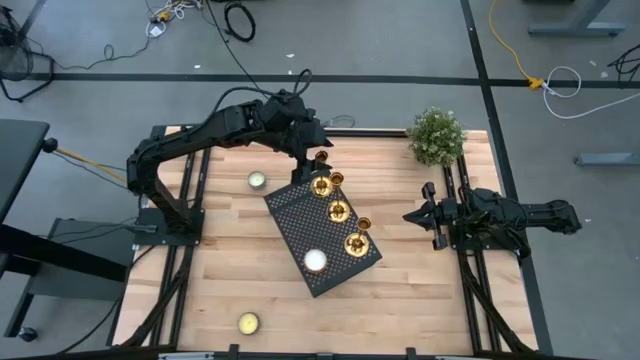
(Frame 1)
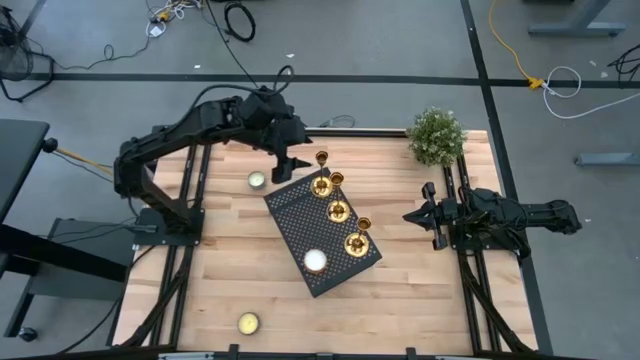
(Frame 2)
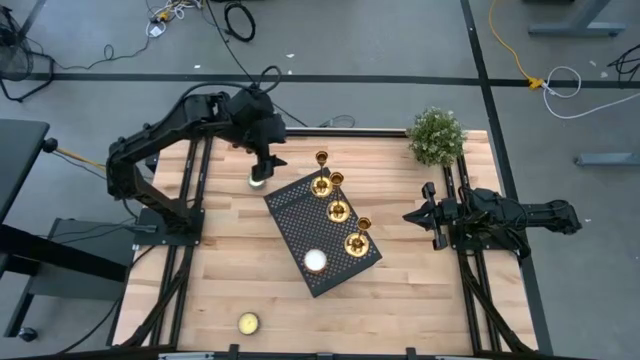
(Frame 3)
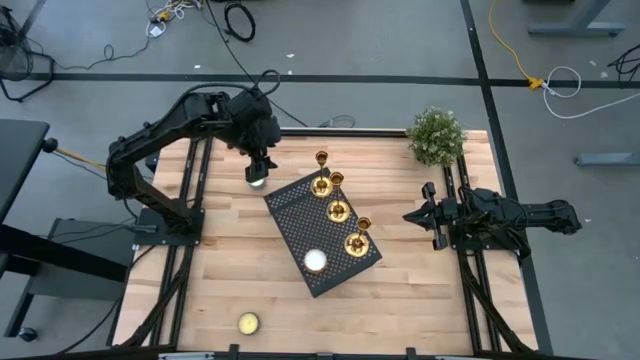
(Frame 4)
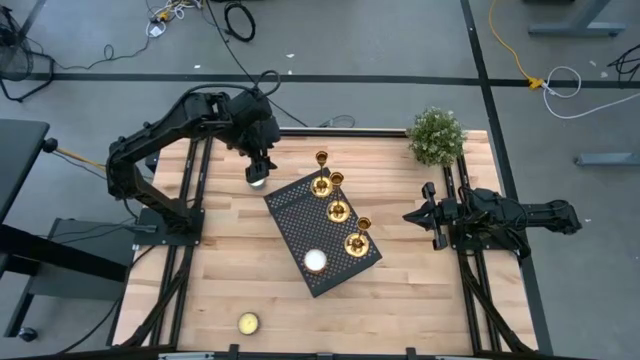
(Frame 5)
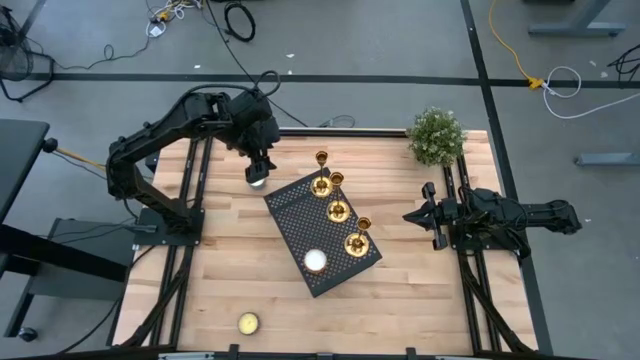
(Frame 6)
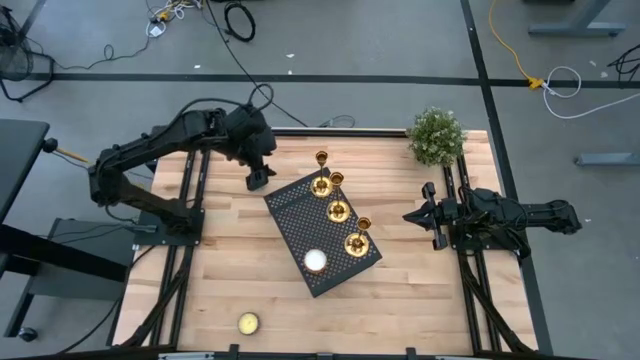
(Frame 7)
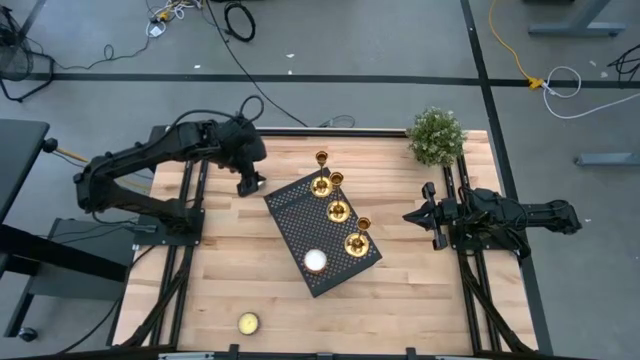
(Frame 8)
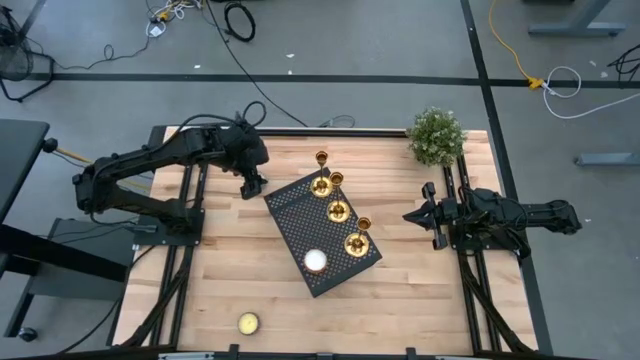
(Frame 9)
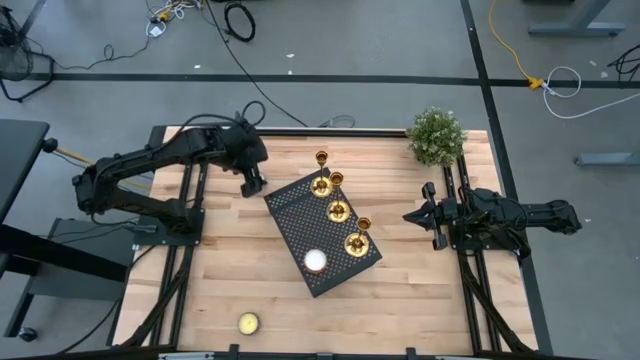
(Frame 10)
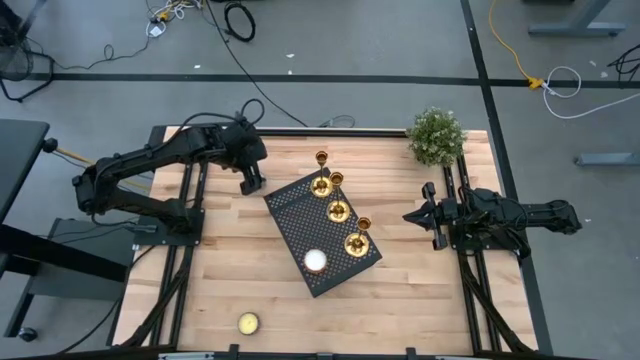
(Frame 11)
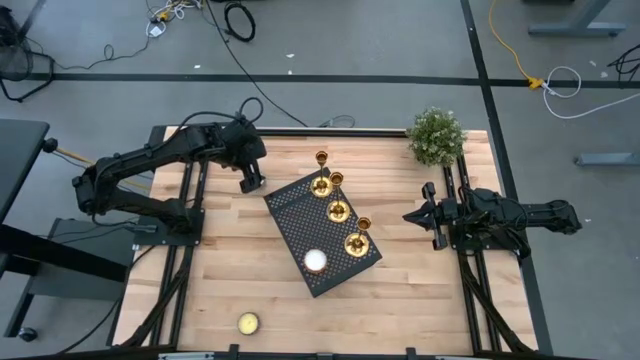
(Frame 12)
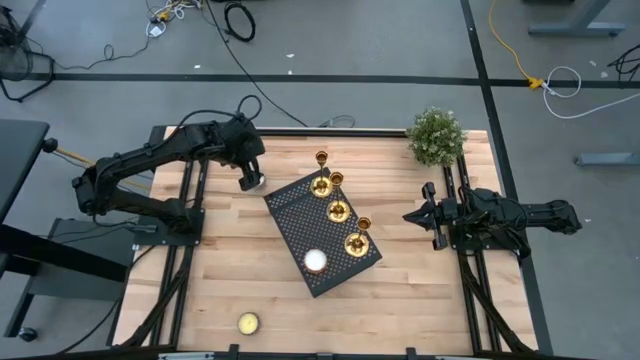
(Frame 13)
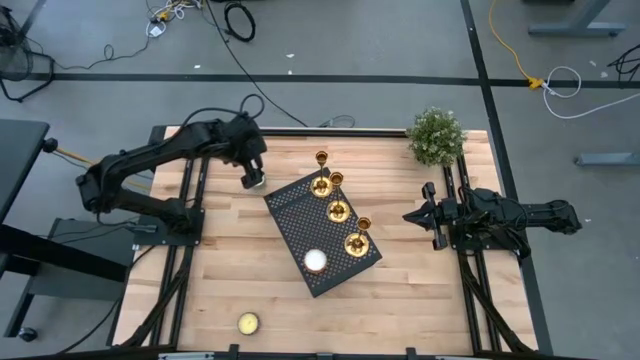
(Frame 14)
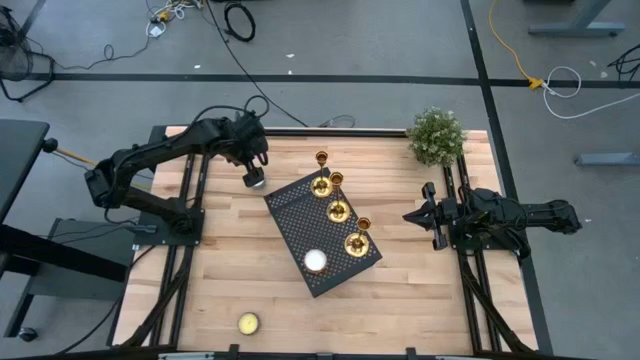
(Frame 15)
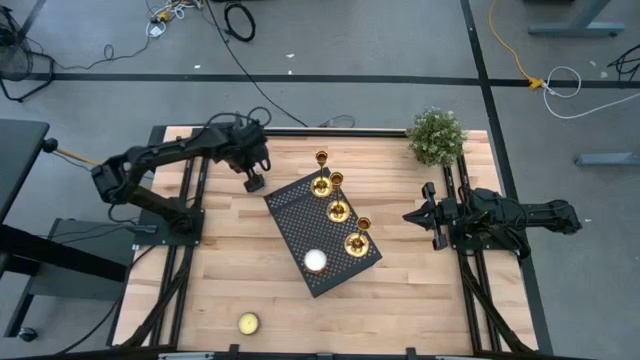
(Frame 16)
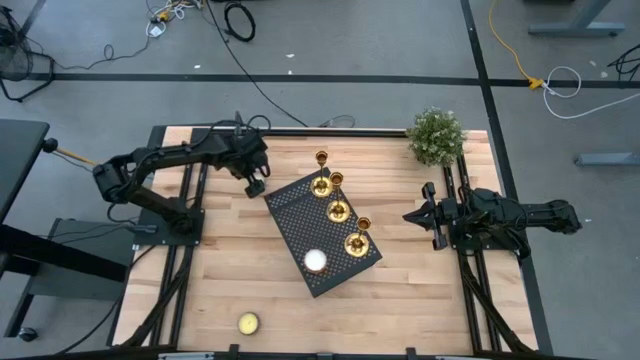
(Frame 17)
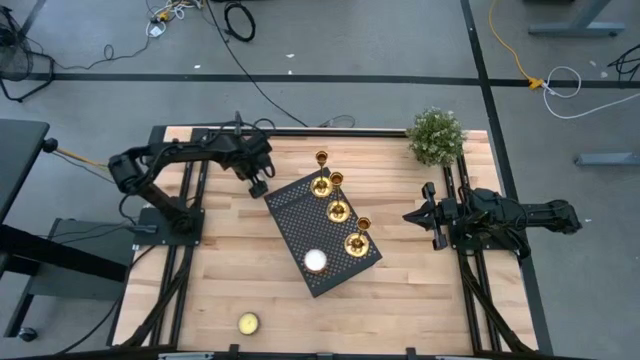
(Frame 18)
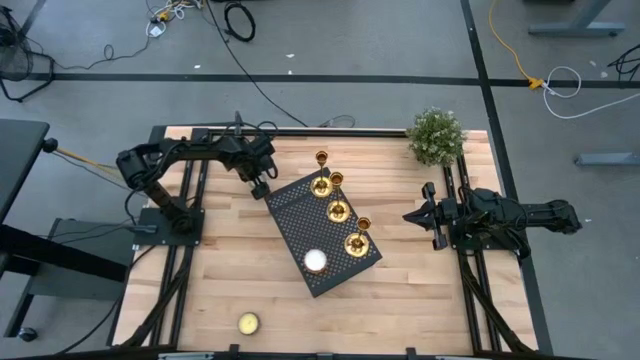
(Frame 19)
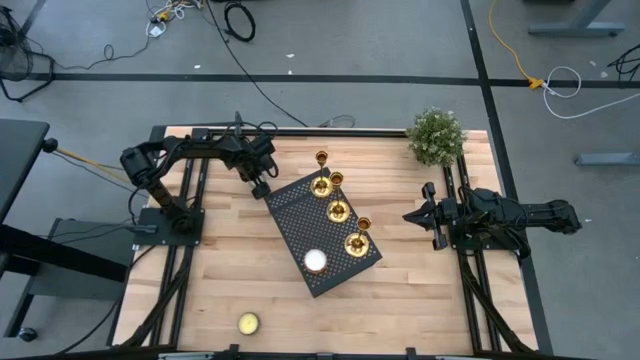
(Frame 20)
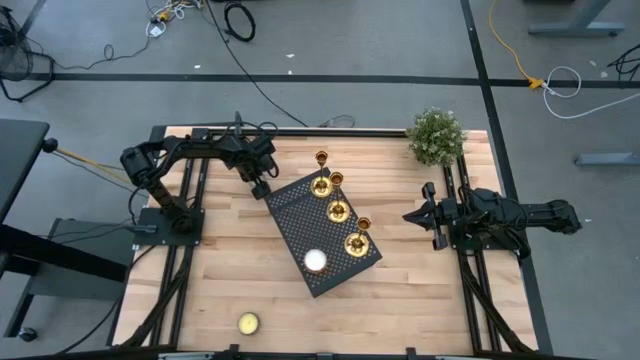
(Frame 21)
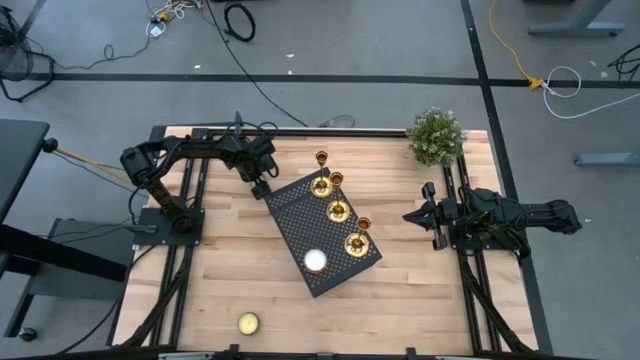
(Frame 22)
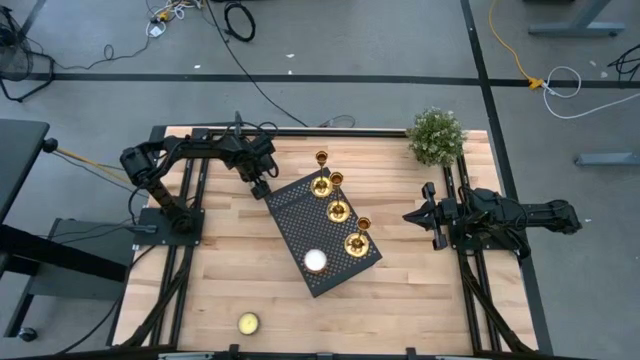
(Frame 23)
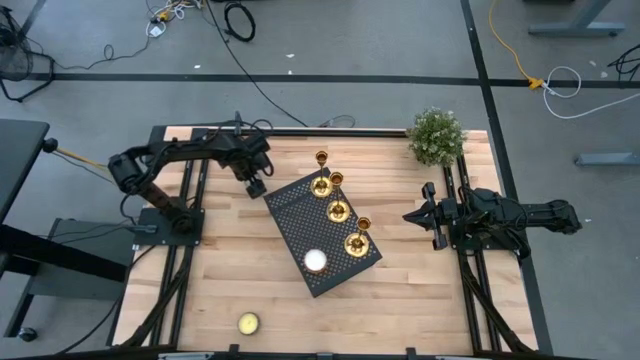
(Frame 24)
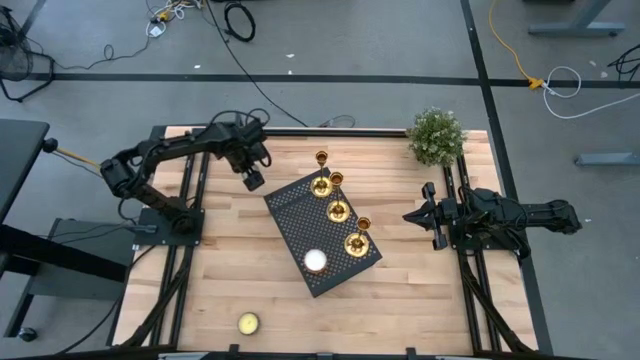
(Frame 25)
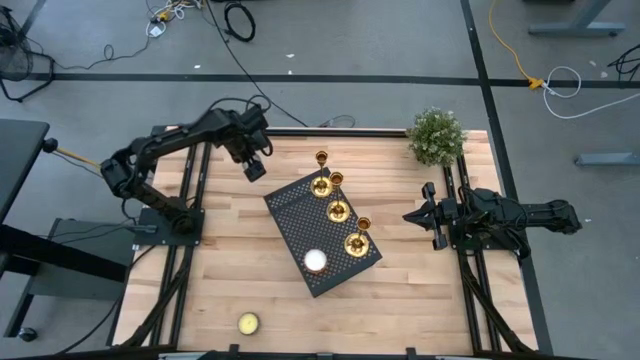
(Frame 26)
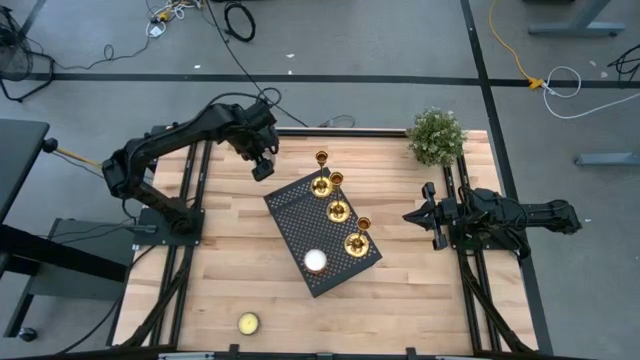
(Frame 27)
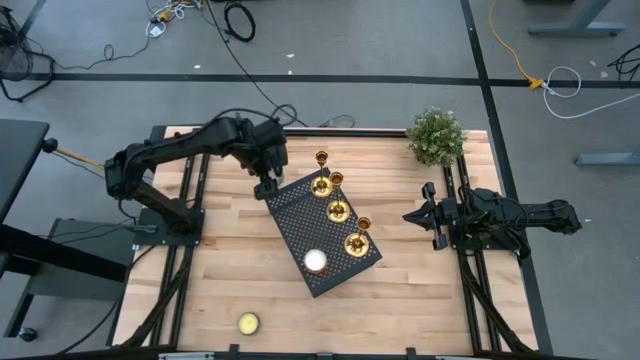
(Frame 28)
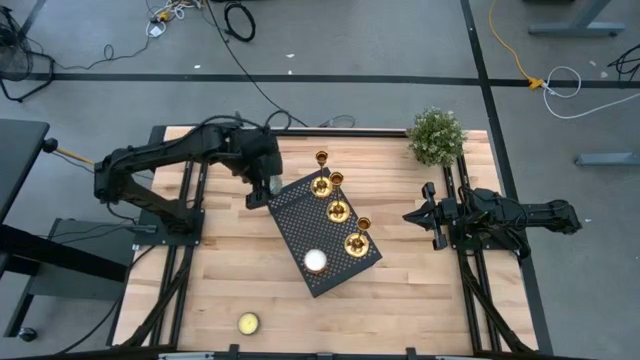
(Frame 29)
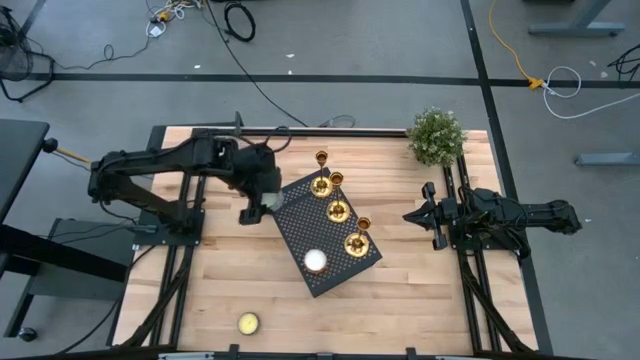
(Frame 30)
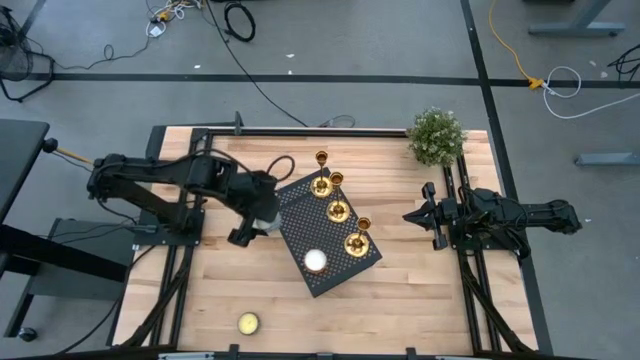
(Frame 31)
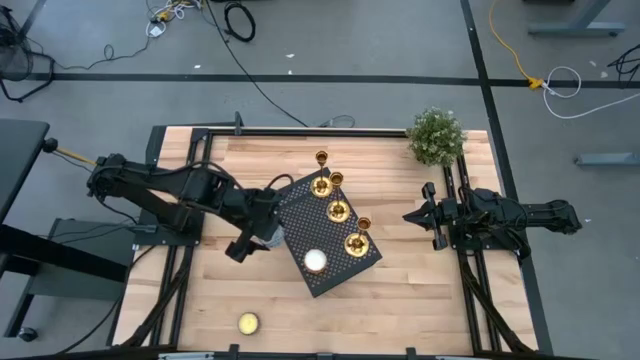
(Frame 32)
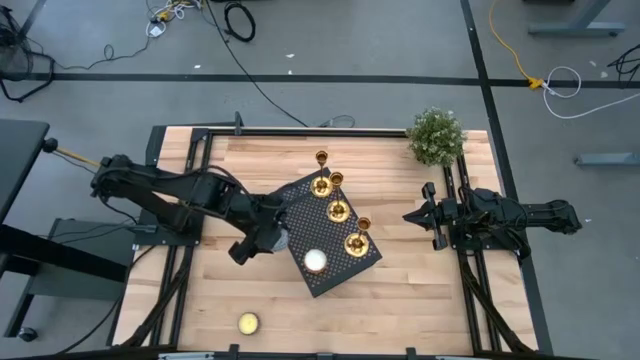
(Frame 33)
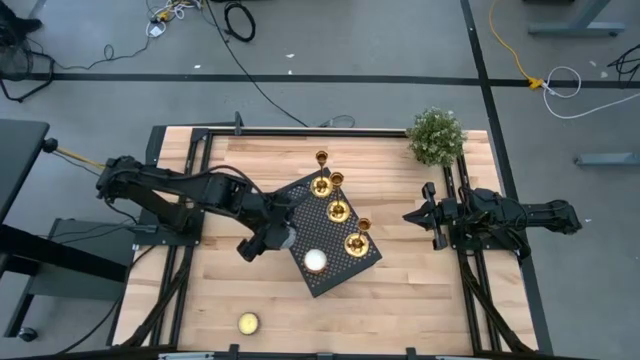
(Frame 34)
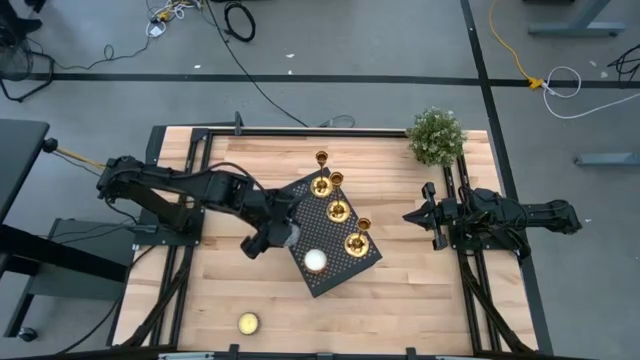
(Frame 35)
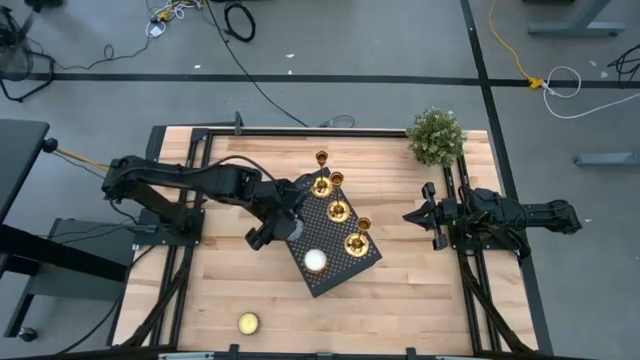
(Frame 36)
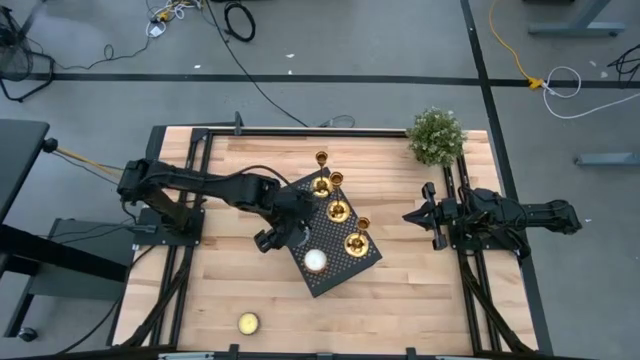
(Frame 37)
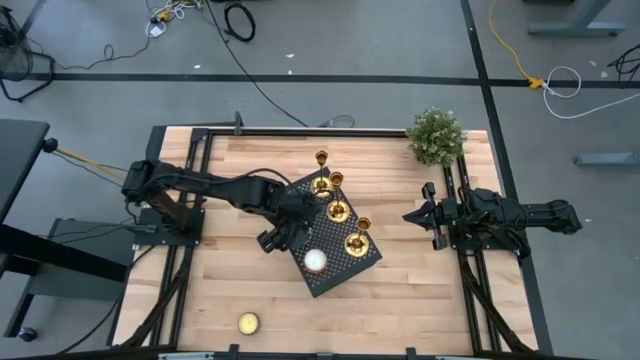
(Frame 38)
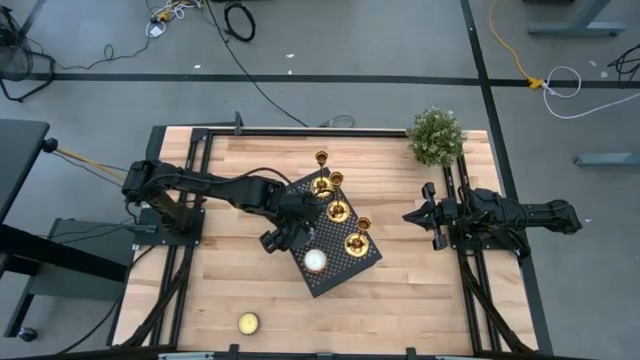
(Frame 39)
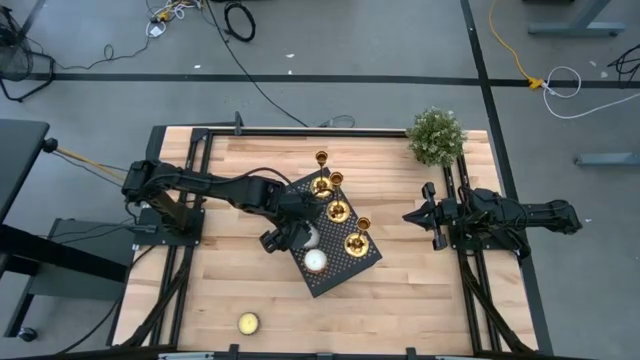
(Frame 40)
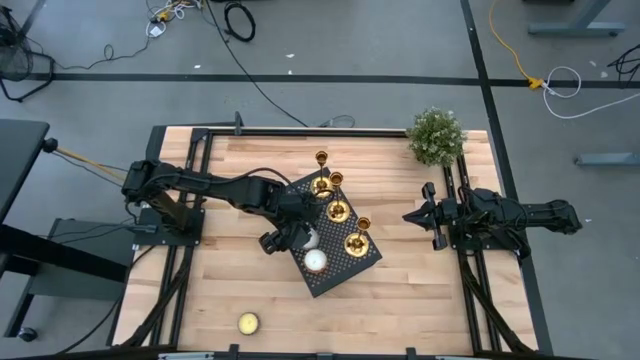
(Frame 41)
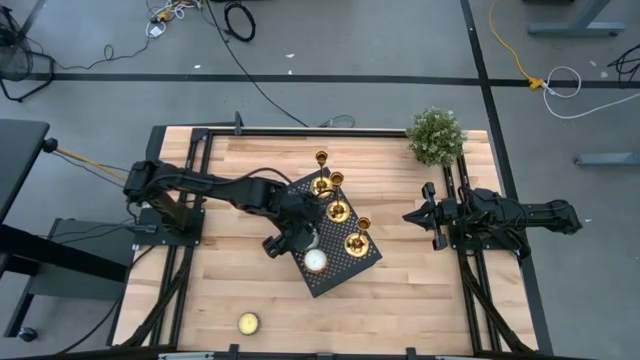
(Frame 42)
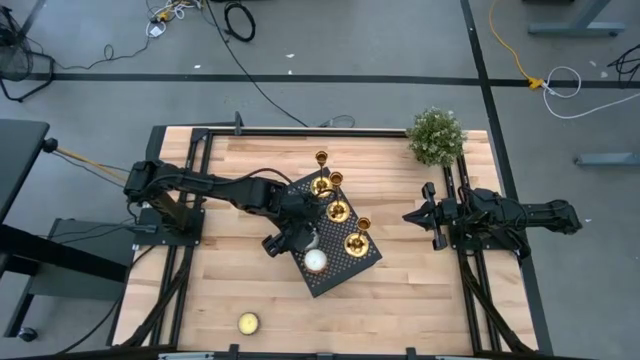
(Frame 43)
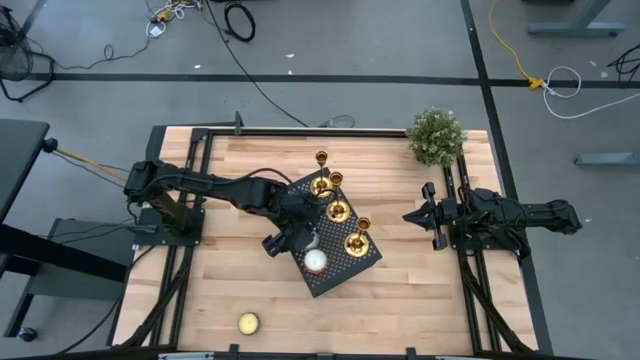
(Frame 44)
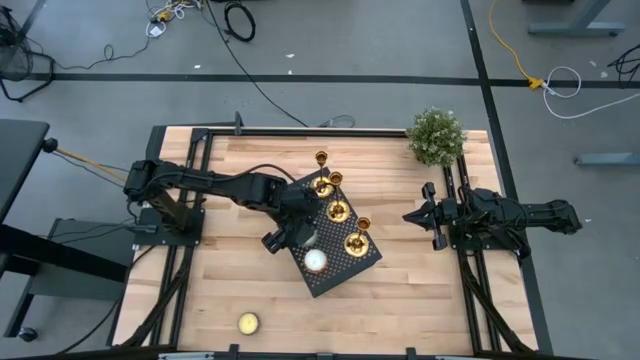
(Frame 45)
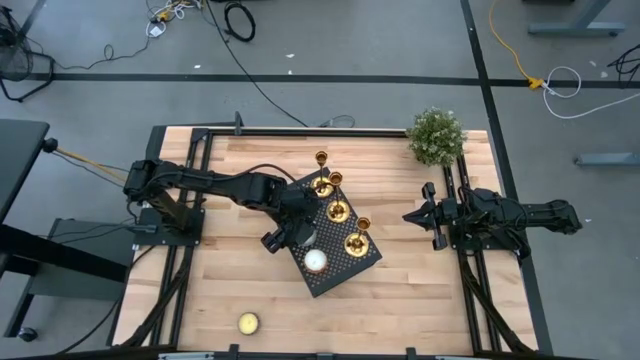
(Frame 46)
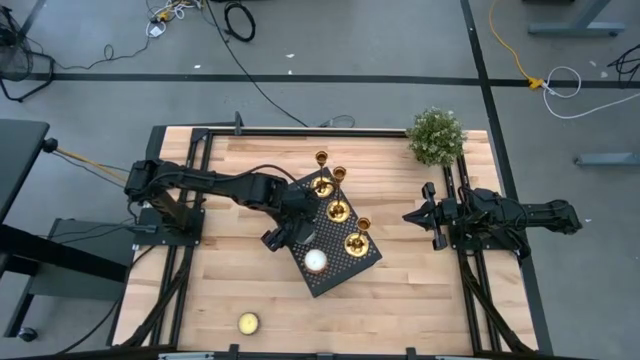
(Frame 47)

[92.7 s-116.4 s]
Task: Pick & Place candle stick holders
Put the blue scented candle on the shelf aligned with the other scented candle
